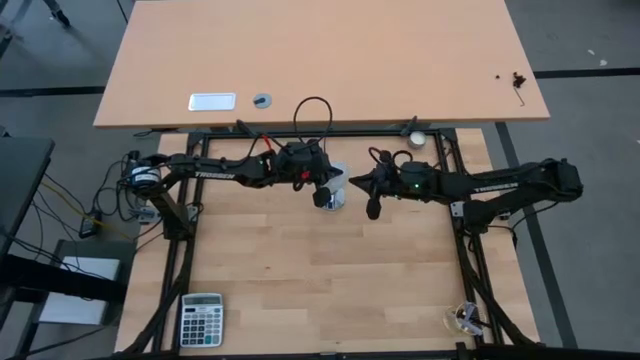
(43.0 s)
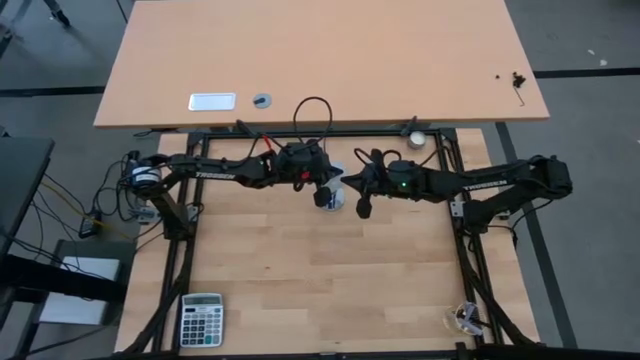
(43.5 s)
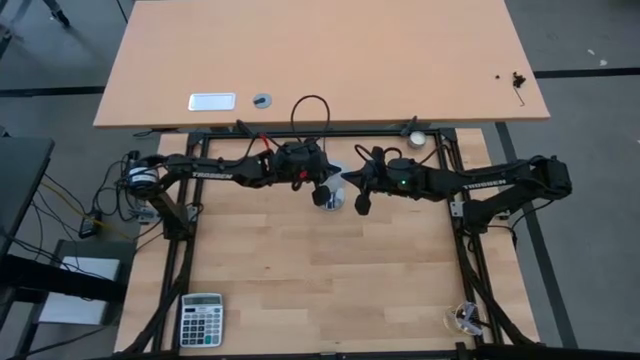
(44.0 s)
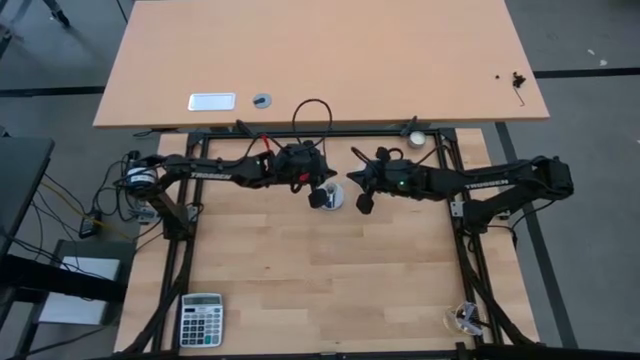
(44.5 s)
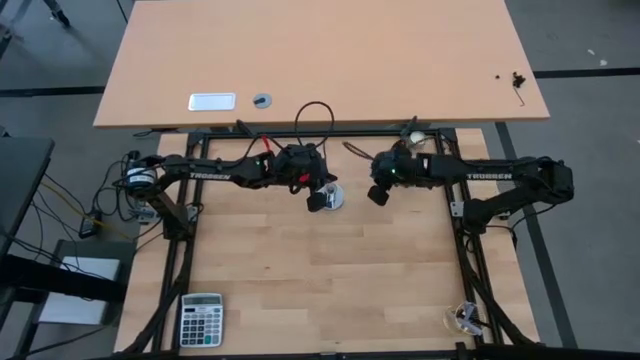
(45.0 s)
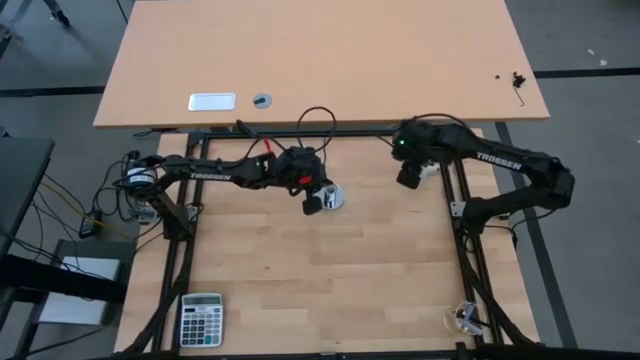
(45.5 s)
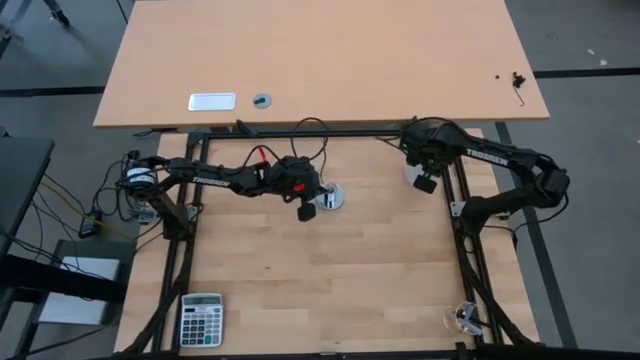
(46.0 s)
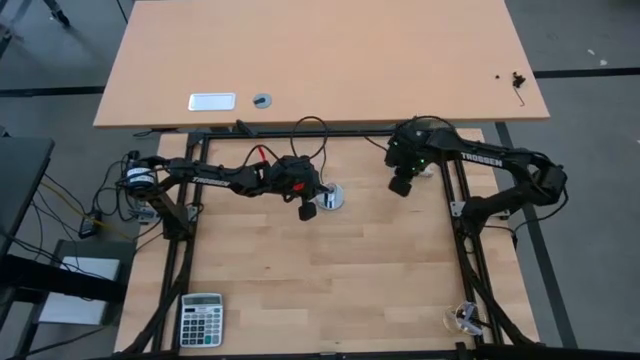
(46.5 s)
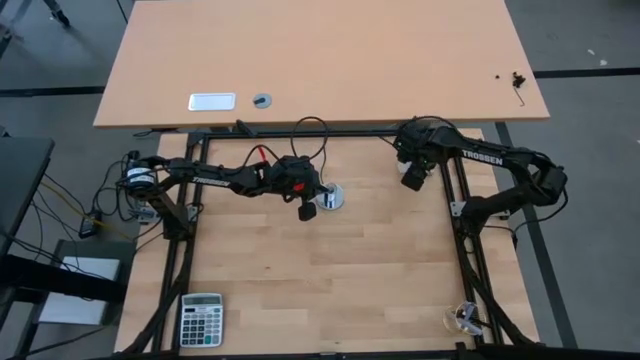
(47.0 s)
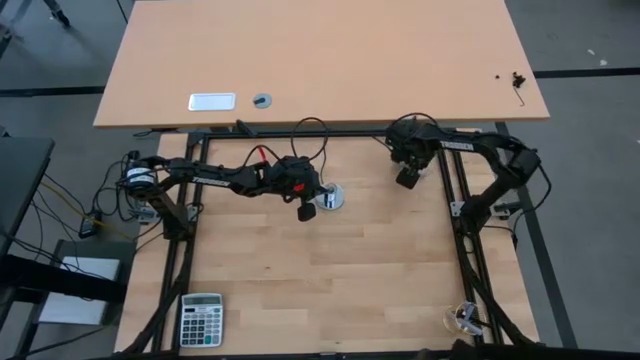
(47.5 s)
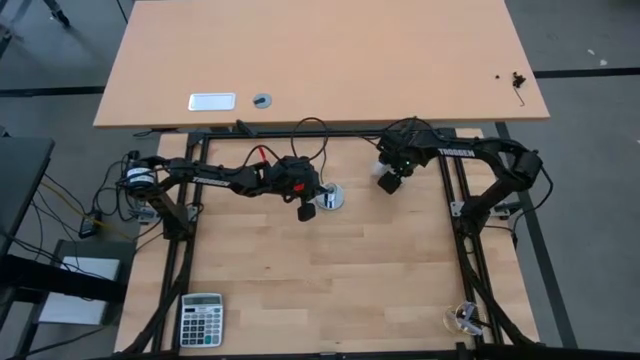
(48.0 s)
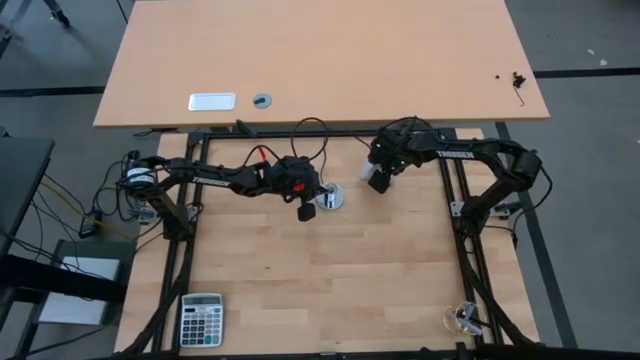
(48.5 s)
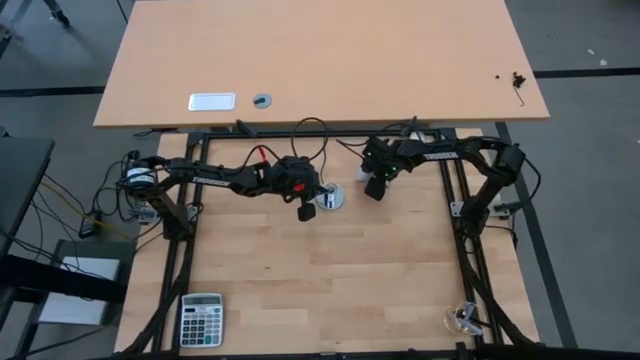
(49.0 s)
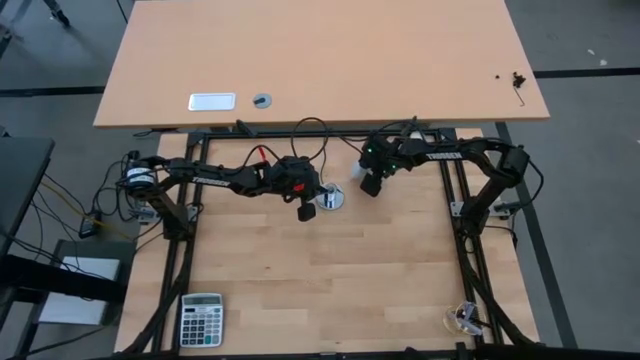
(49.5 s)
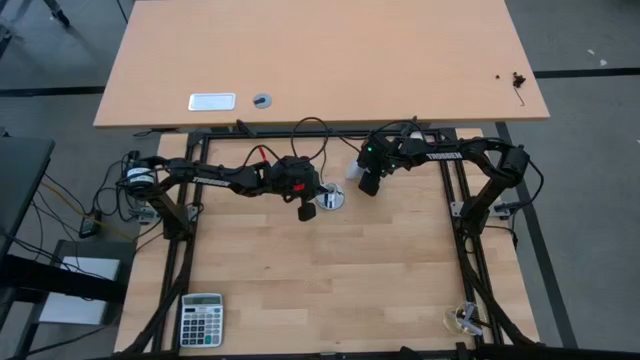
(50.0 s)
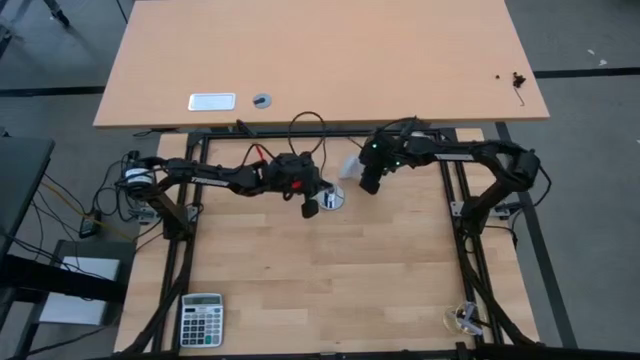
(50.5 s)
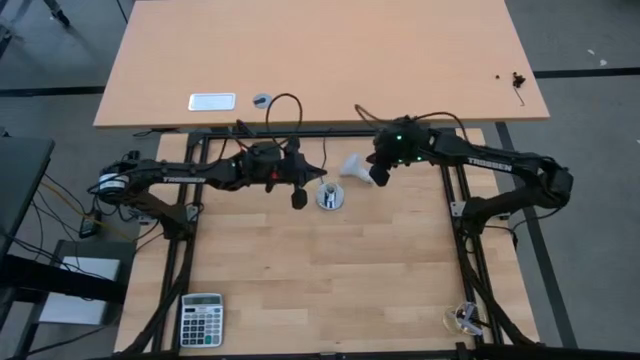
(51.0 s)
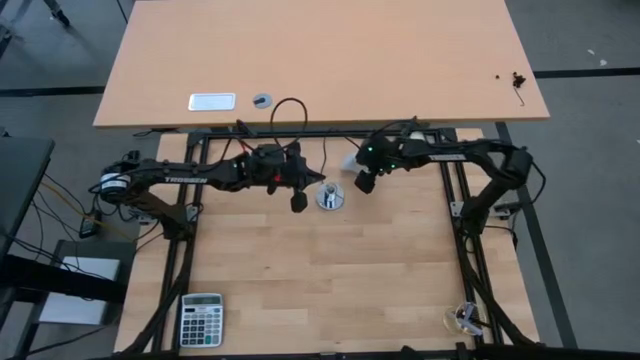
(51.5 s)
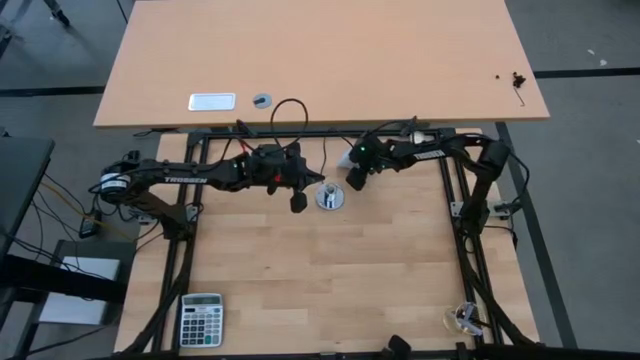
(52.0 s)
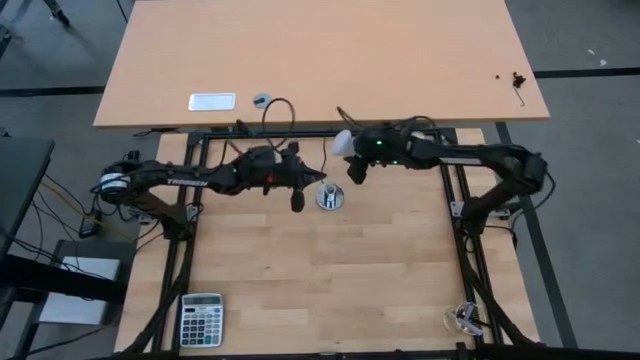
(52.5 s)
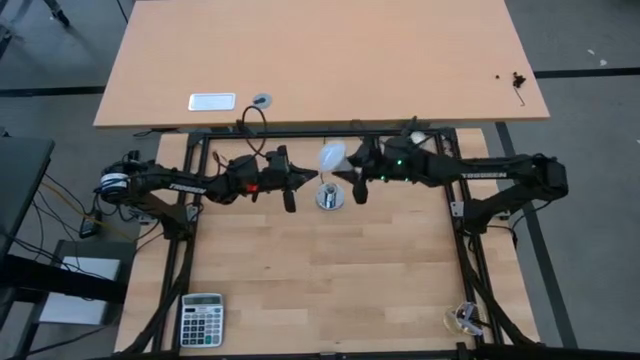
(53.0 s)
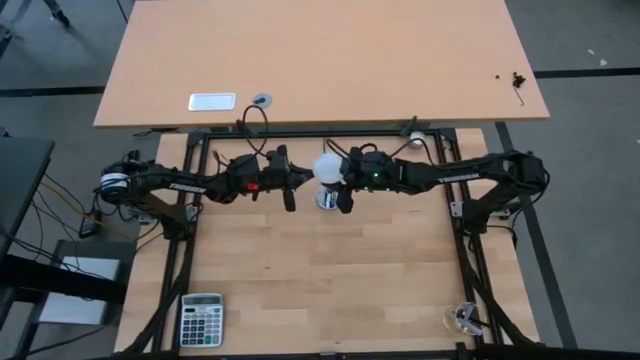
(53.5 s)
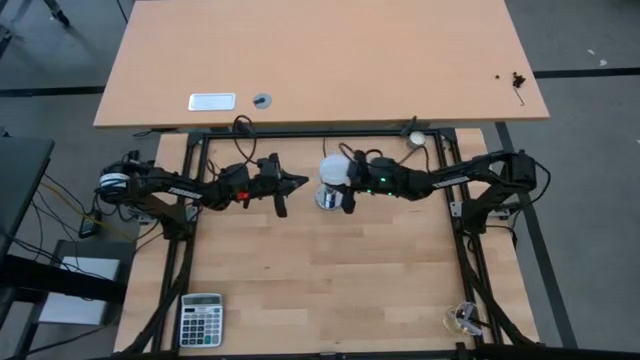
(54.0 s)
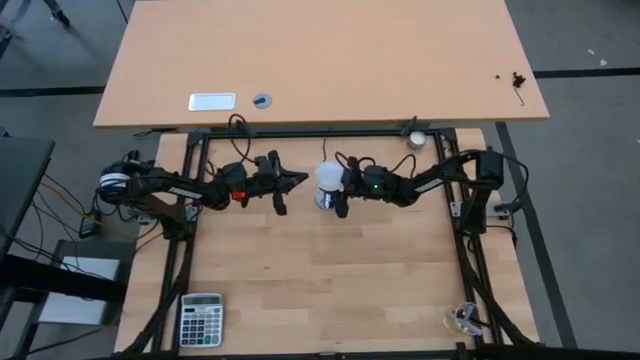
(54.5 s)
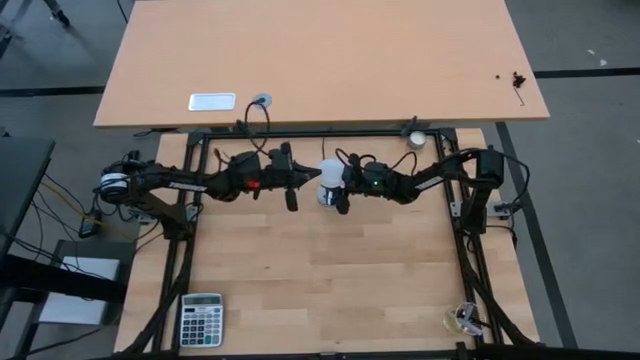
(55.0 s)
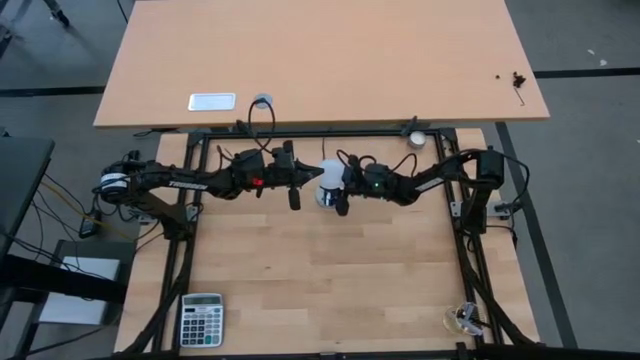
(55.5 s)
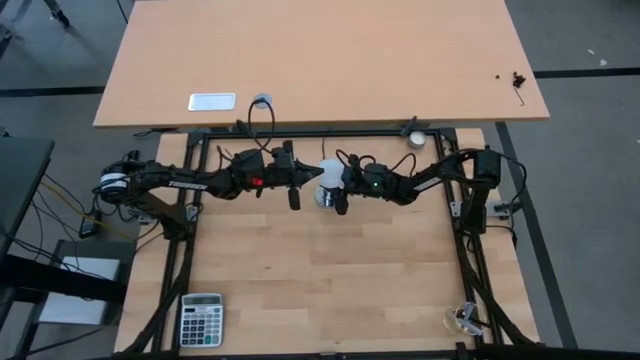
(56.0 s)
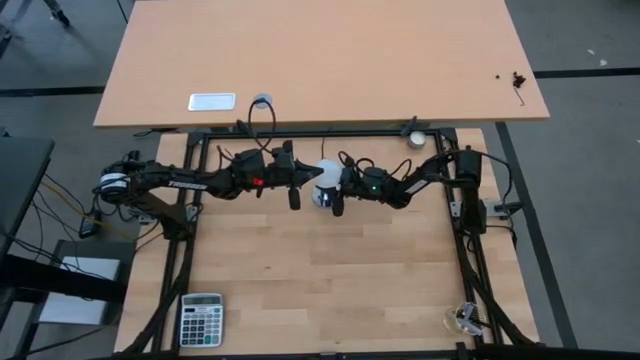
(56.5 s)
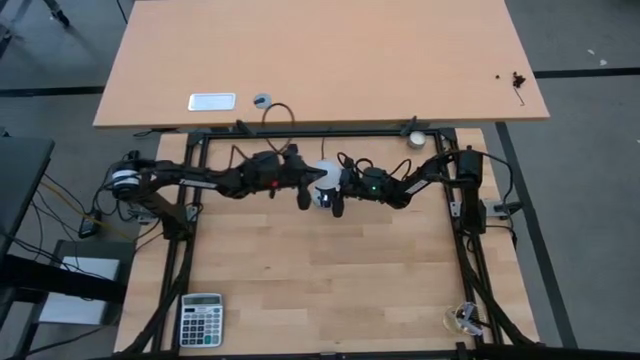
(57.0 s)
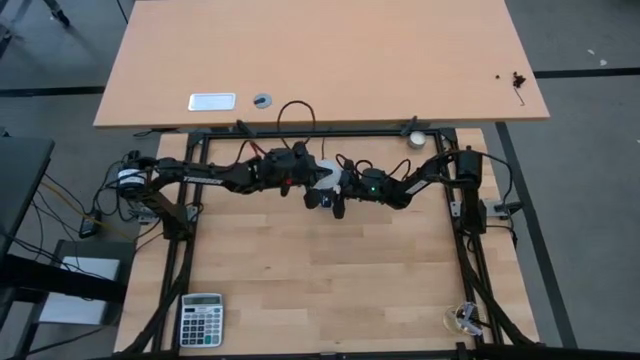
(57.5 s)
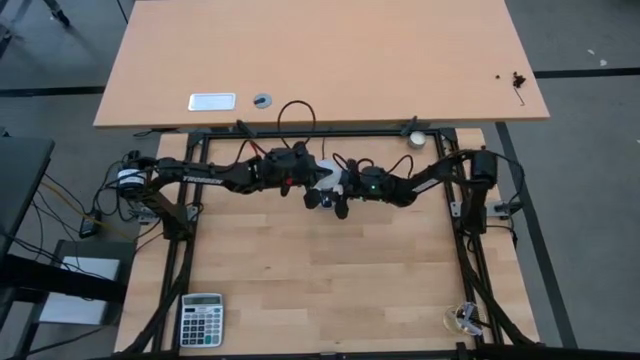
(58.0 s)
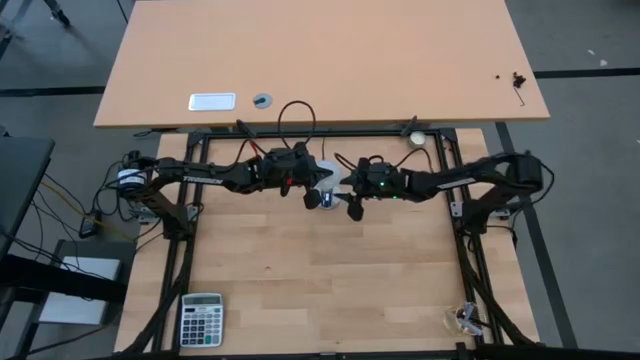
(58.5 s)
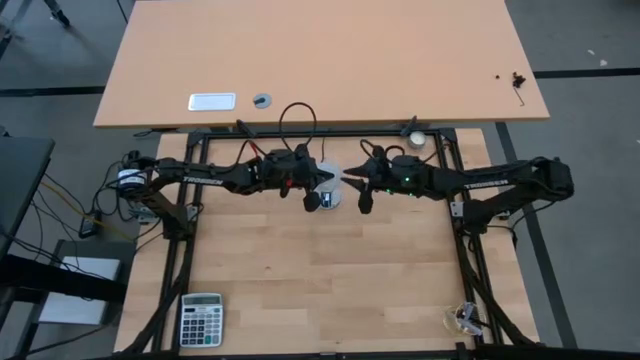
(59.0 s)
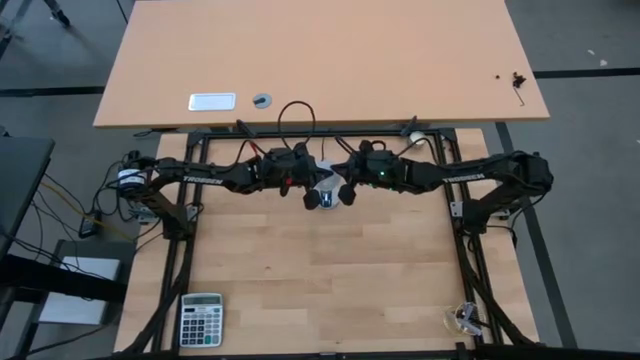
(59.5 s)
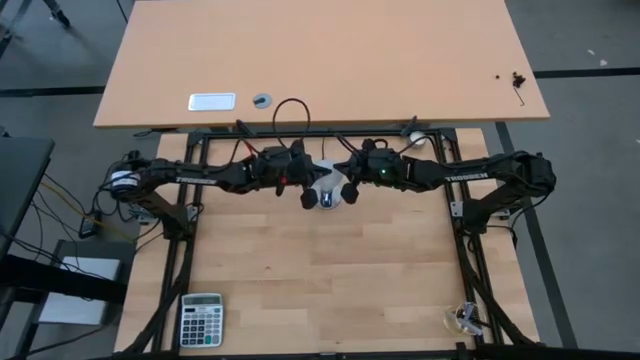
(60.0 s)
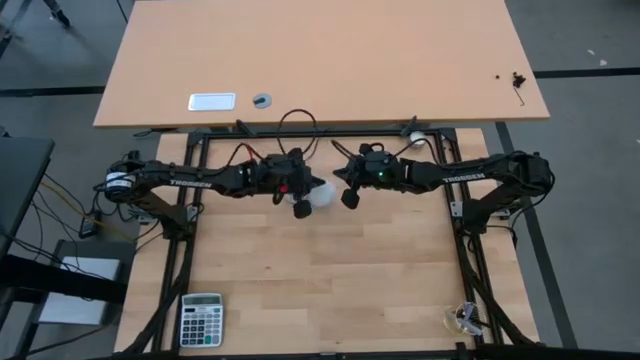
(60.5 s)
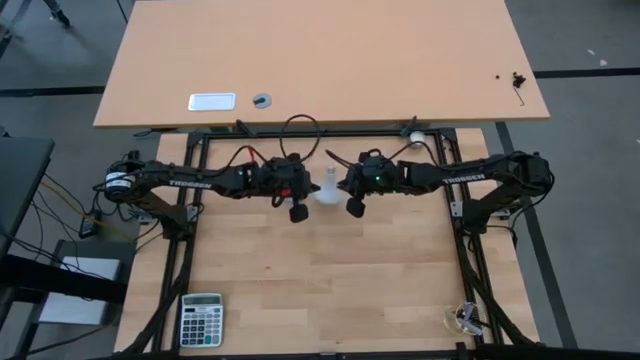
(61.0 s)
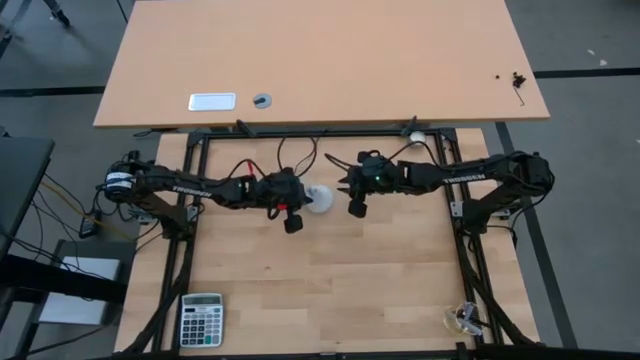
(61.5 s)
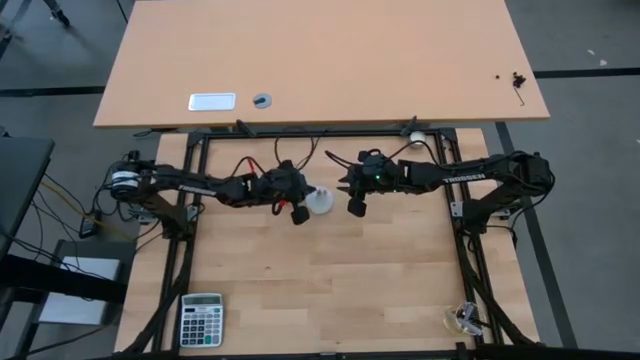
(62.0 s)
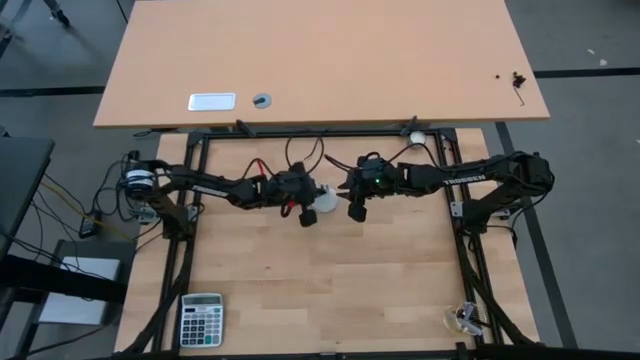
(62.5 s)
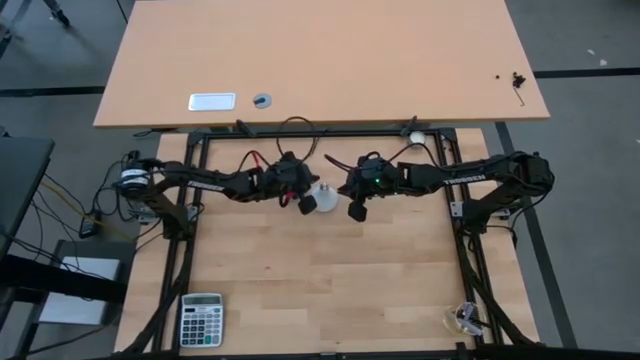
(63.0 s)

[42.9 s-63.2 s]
Task: Screw lightbulb
Insert the lightbulb into the silver lamp socket

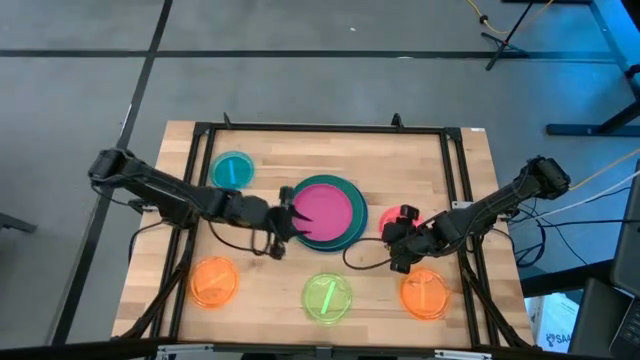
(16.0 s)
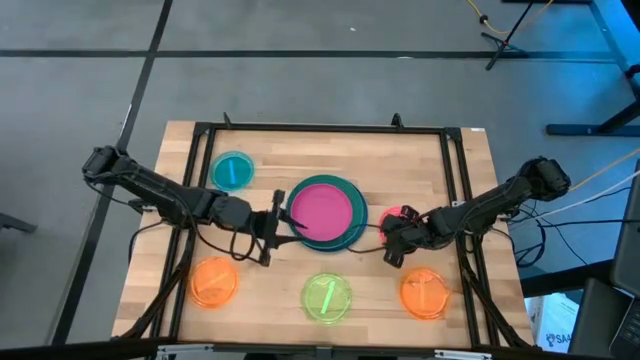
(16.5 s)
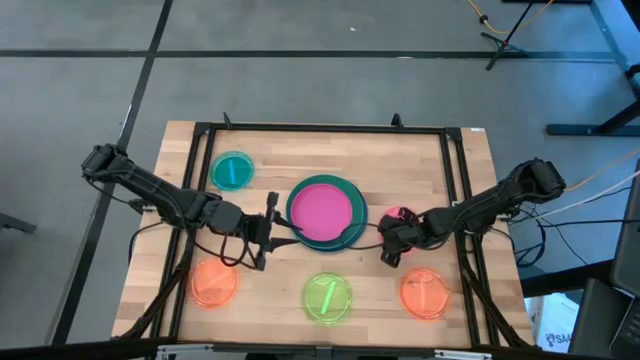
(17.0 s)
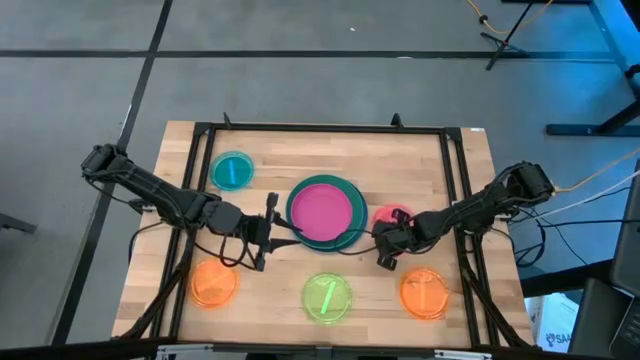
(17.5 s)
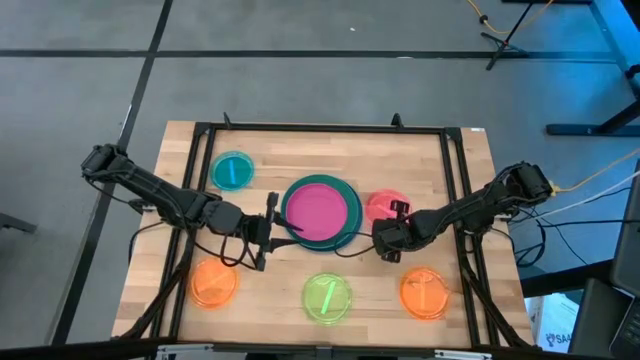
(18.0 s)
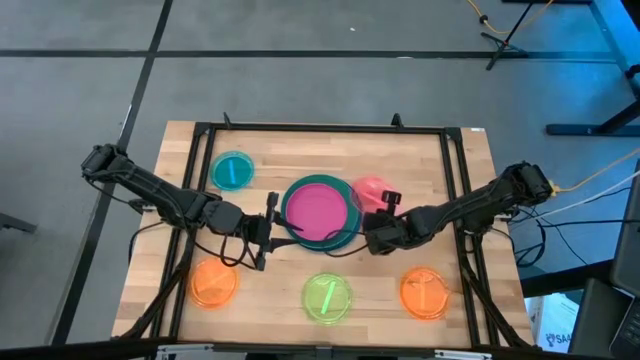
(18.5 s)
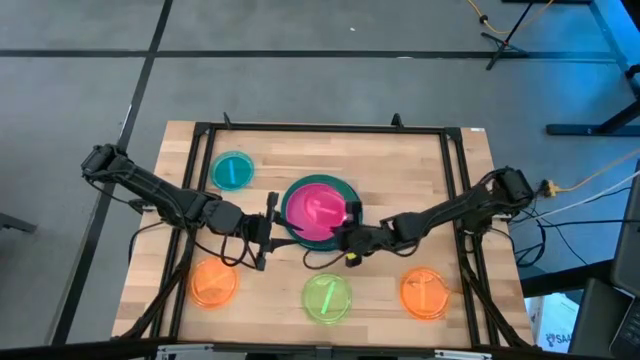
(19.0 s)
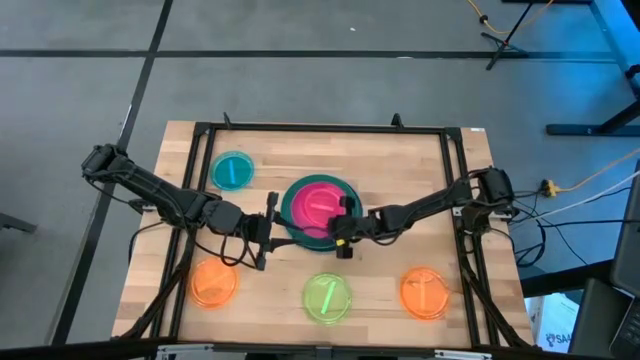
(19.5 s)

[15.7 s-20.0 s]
Task: Stack plastic plates
Stack the transparent pink plate on top of the pink plate
